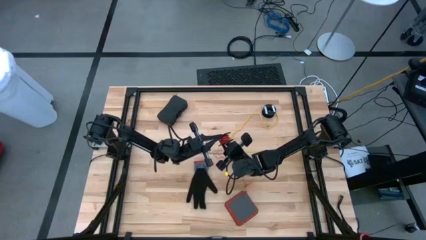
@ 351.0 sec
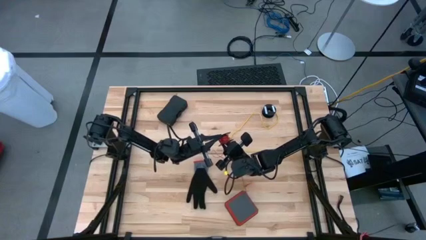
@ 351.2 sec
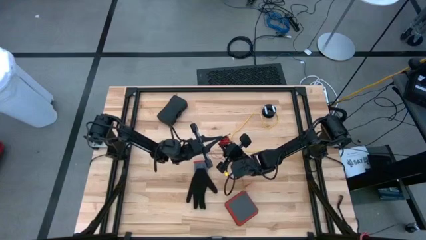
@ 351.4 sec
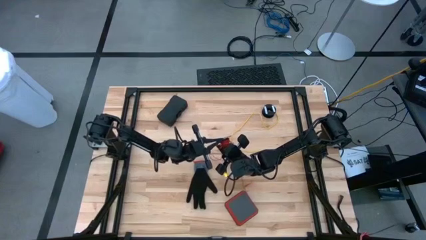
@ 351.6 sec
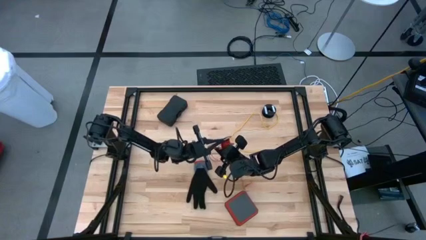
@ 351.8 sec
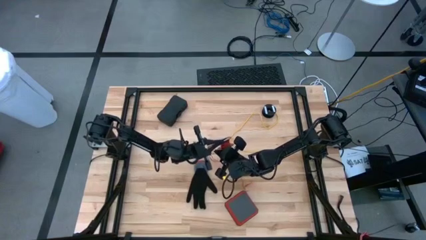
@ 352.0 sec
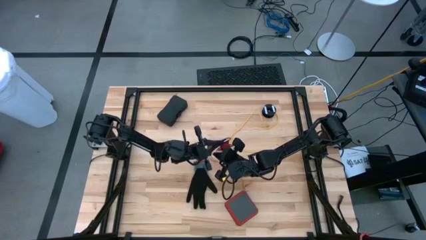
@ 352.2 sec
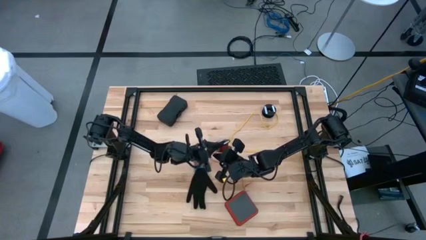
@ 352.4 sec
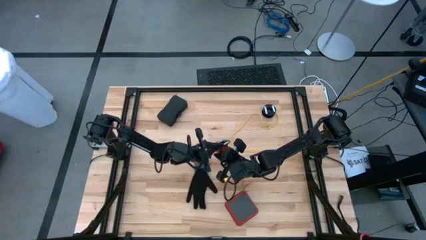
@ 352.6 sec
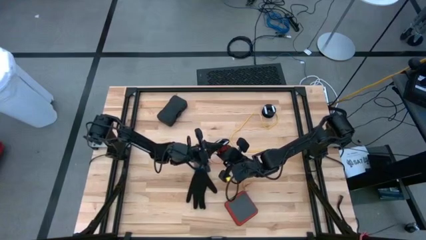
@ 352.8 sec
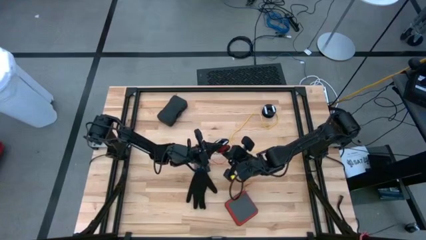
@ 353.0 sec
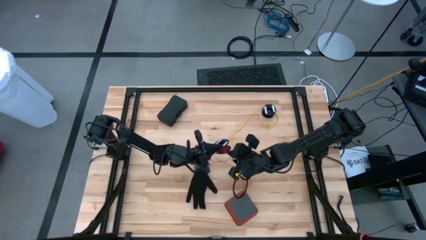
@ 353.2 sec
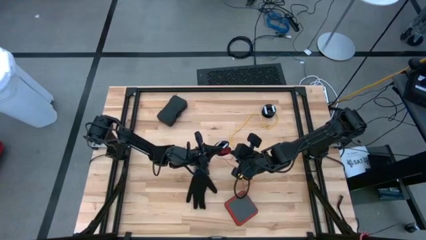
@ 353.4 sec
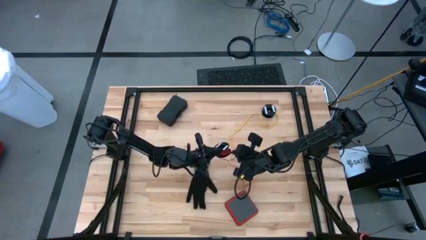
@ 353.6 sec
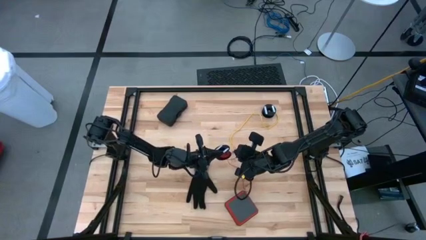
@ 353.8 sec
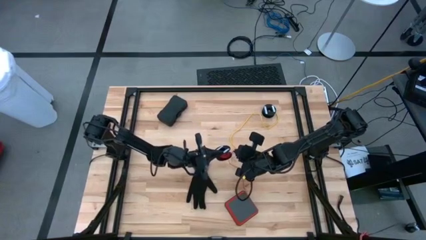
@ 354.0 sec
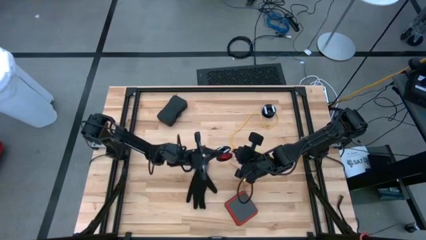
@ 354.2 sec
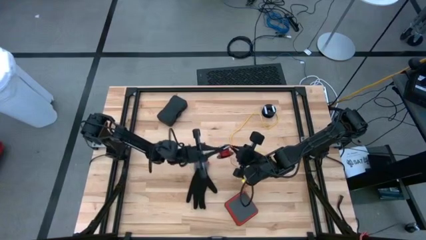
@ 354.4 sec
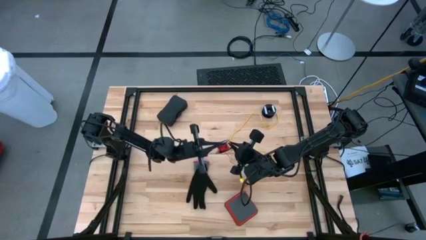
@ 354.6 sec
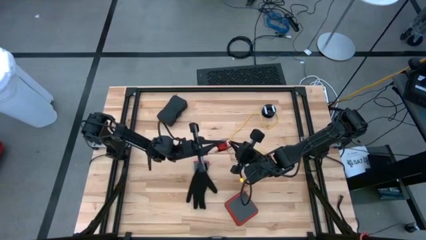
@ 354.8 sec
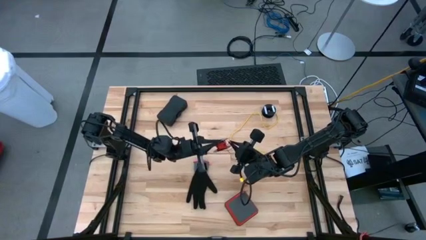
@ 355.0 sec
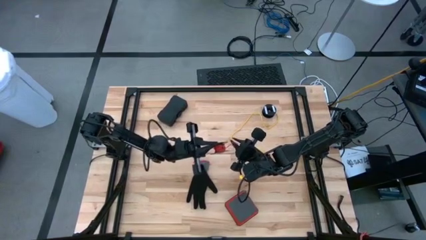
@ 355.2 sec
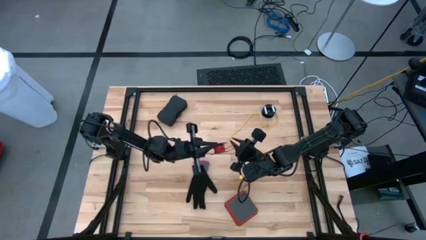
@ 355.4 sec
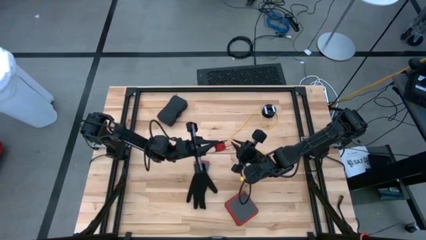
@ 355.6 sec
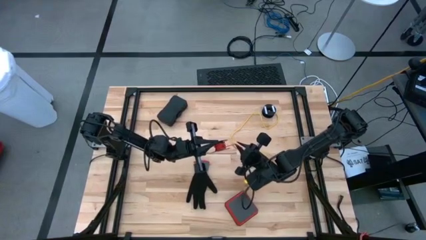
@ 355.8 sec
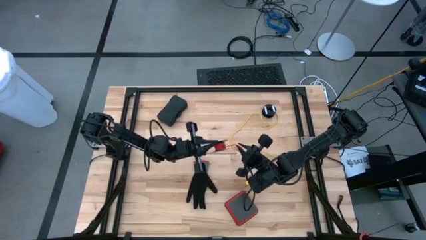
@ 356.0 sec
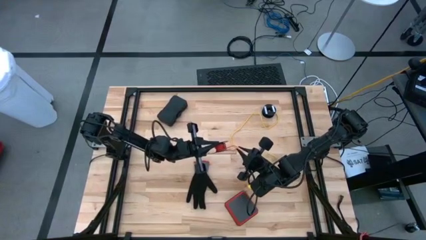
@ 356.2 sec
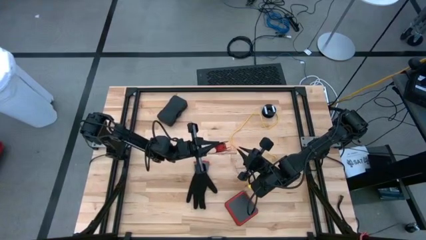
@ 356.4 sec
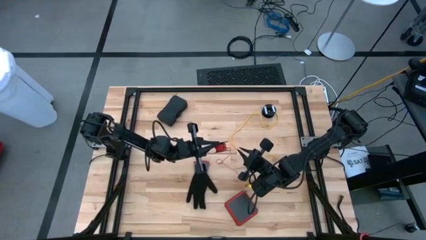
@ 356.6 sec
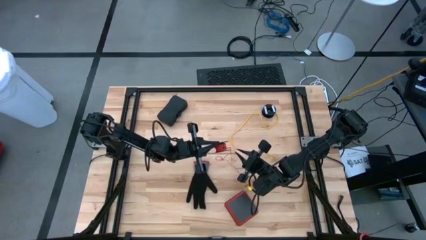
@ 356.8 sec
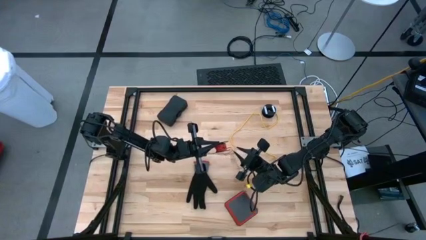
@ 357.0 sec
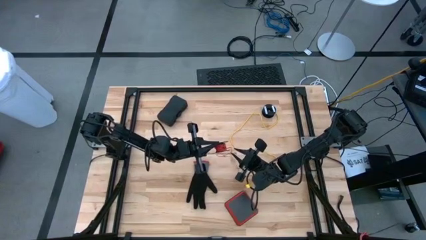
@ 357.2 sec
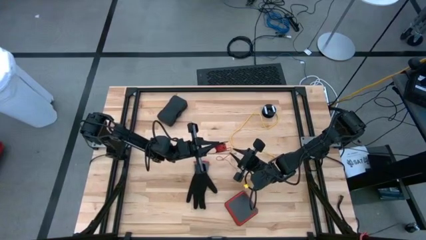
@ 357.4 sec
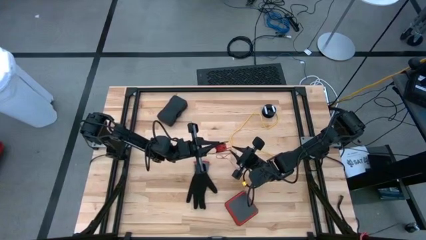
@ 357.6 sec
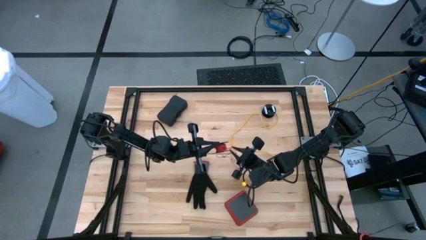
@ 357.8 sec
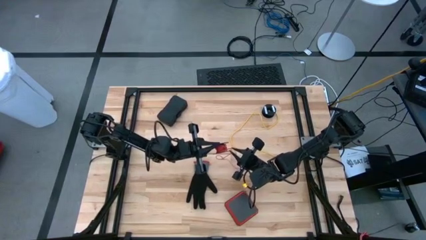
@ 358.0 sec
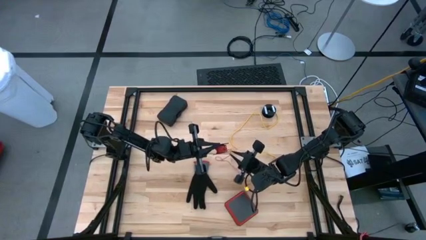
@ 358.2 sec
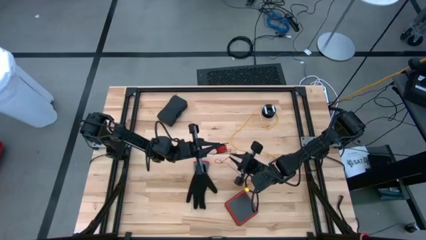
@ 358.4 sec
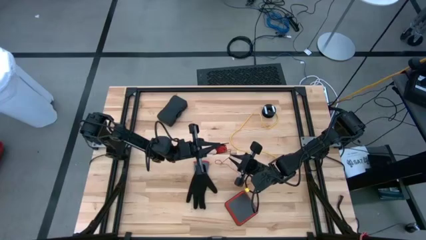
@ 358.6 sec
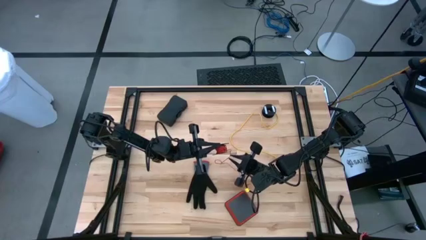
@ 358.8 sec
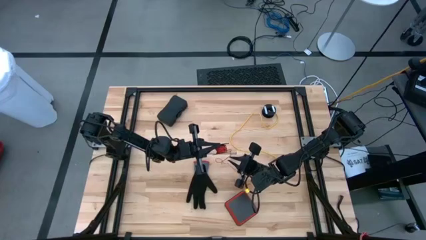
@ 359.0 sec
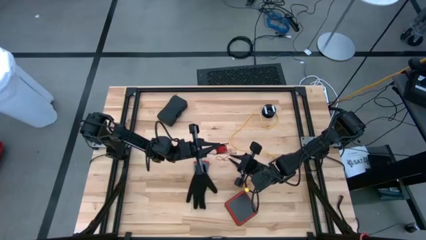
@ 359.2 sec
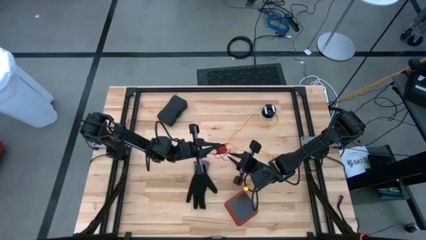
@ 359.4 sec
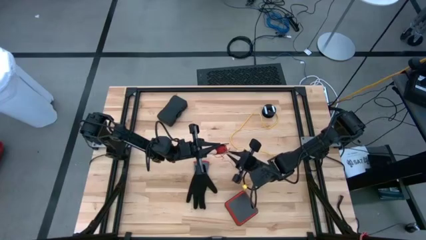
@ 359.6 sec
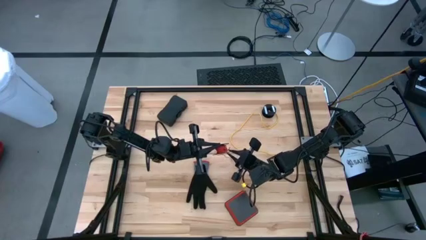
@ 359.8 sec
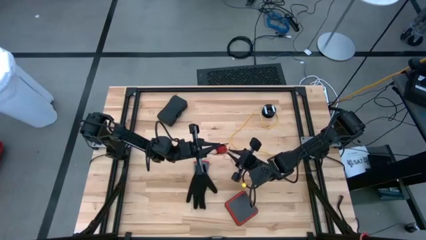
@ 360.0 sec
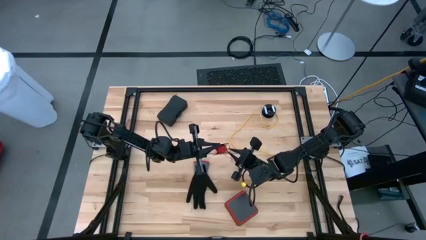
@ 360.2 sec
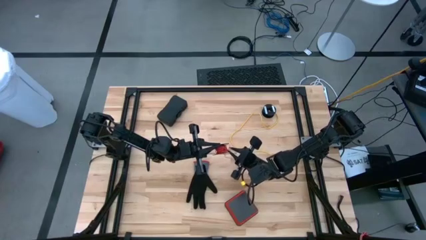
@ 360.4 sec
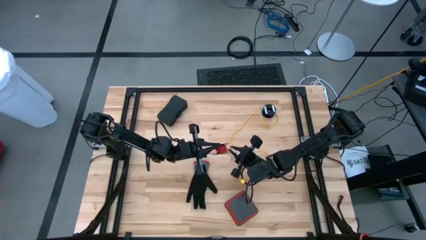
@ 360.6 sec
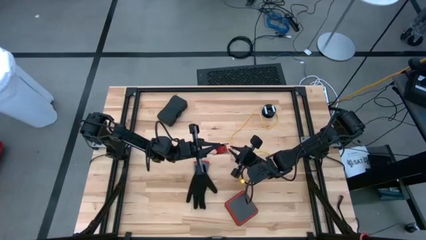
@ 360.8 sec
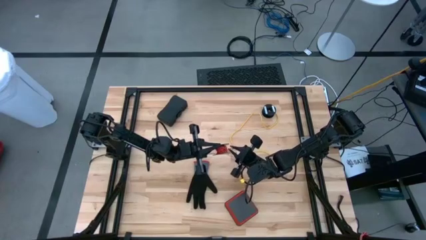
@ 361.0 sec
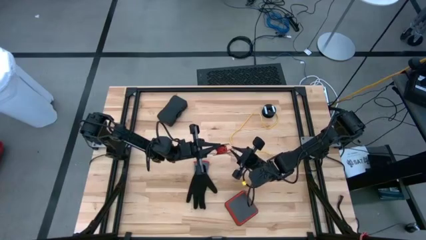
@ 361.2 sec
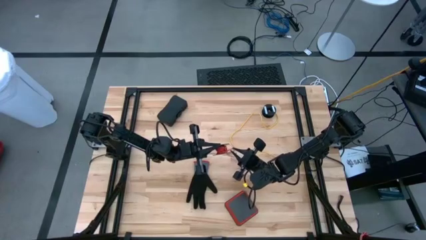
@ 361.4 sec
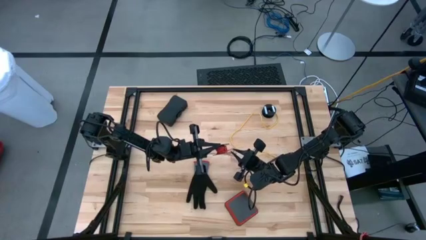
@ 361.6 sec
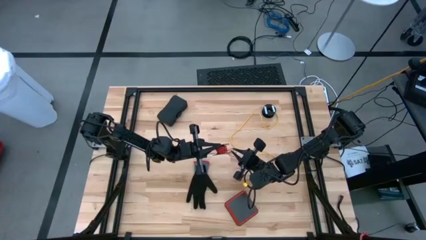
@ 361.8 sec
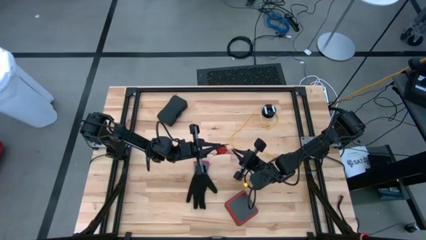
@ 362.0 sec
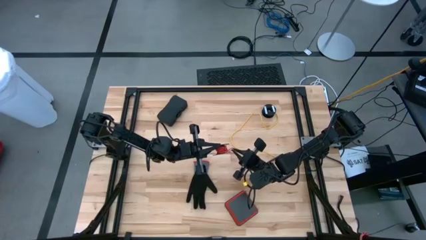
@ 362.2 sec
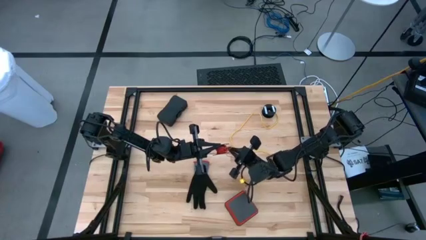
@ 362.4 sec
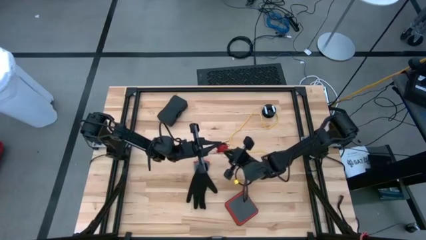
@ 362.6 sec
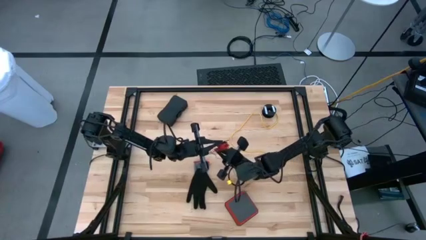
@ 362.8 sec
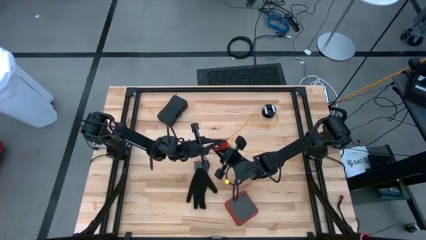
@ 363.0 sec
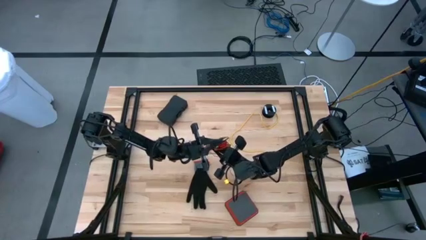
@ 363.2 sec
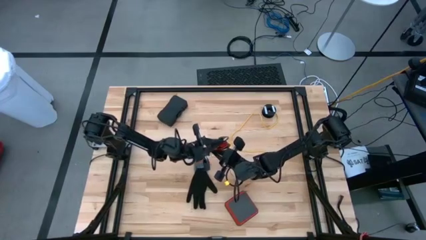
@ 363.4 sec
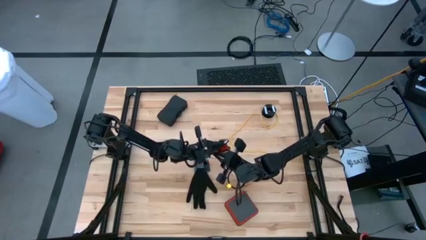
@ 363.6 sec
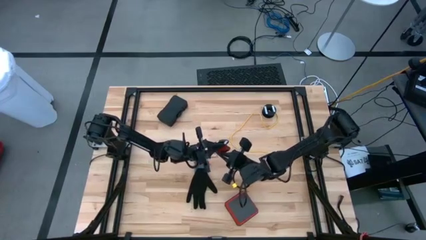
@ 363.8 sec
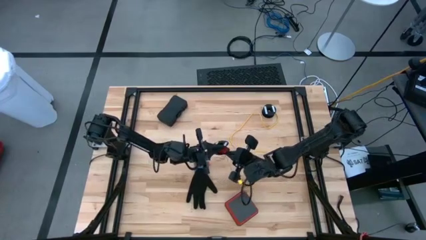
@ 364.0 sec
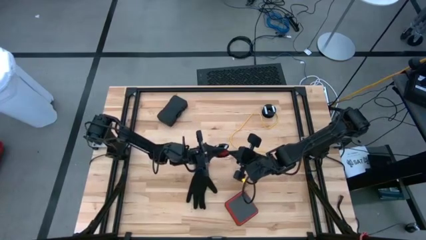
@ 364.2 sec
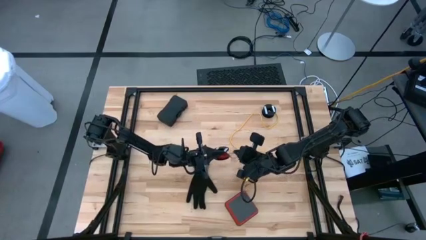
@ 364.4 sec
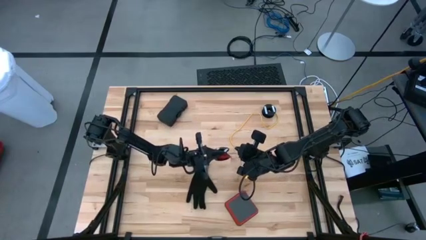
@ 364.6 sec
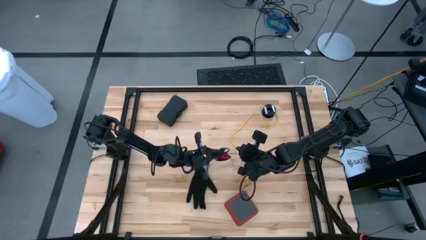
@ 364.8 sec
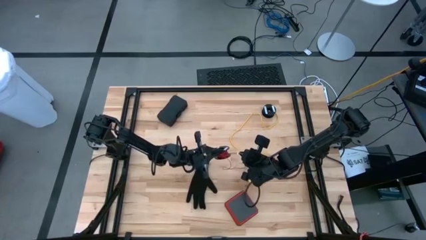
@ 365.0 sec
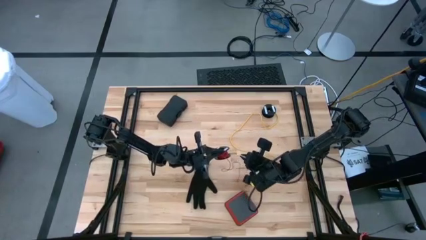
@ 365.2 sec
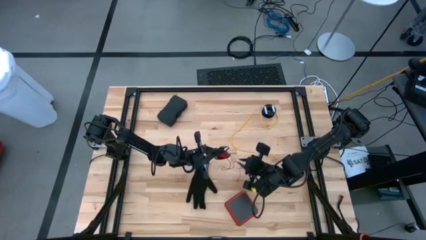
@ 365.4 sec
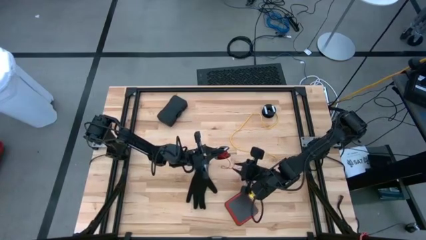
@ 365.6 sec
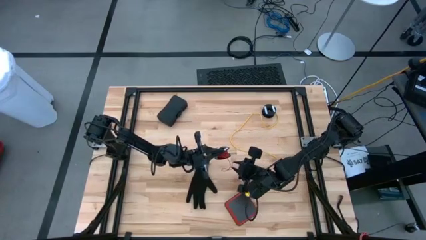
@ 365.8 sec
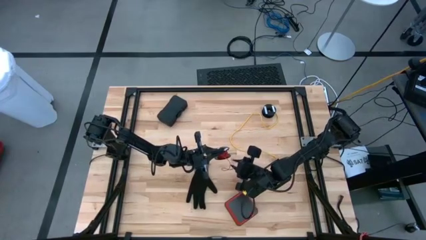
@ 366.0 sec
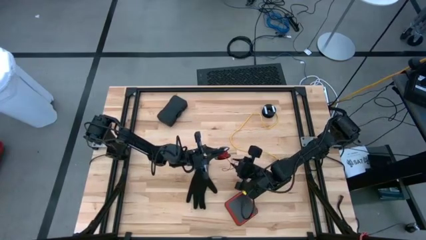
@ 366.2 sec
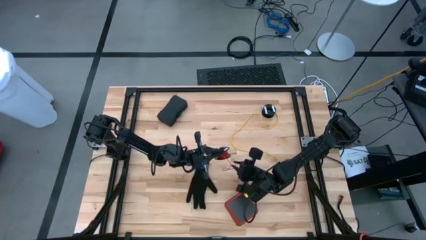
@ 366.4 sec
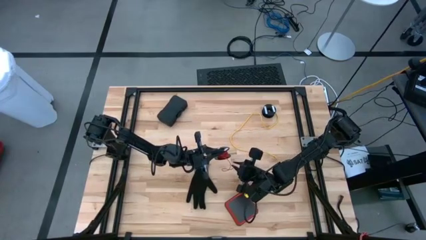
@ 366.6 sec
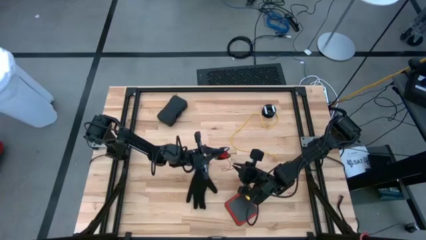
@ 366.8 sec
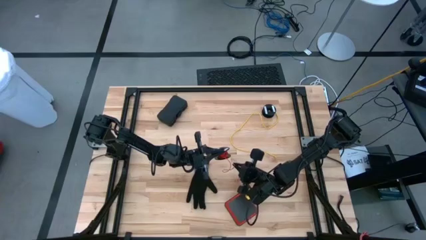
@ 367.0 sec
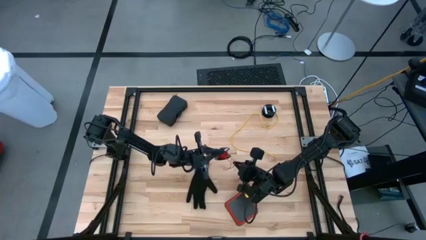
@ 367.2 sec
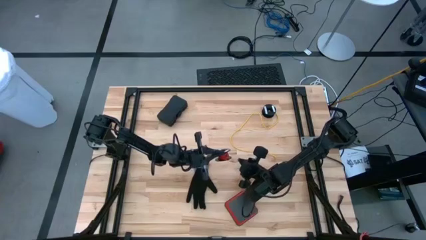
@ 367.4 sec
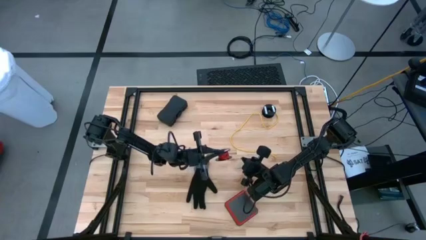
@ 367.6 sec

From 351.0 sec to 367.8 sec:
Task: Coil cords
Coil the red wire onto the black spool
